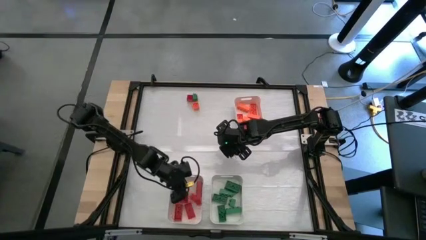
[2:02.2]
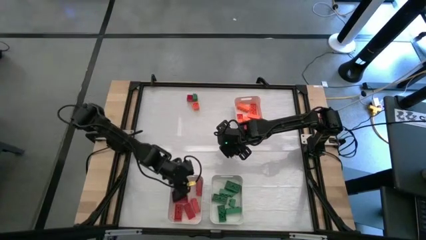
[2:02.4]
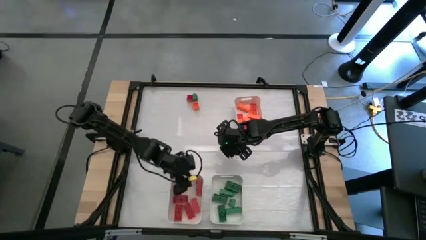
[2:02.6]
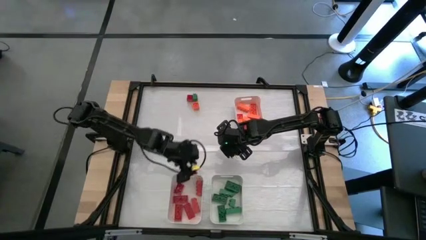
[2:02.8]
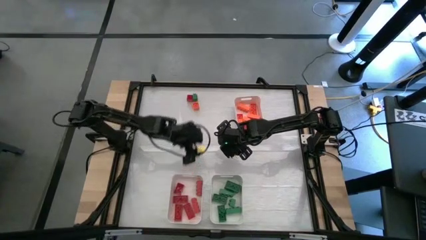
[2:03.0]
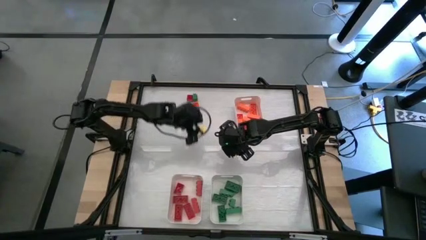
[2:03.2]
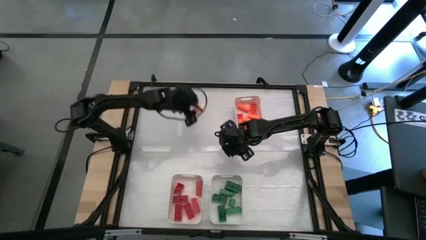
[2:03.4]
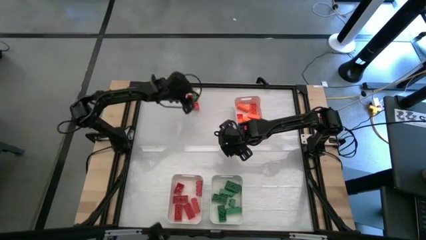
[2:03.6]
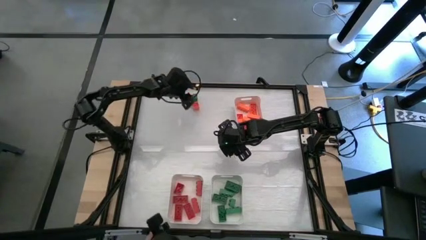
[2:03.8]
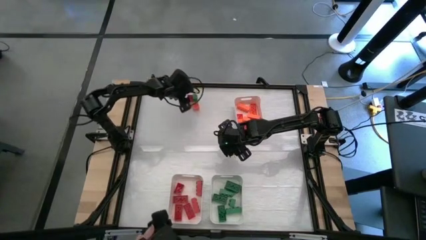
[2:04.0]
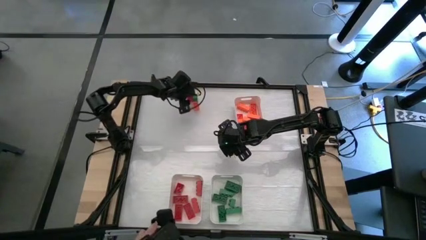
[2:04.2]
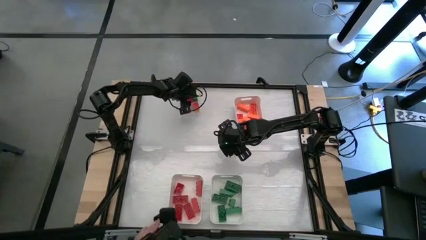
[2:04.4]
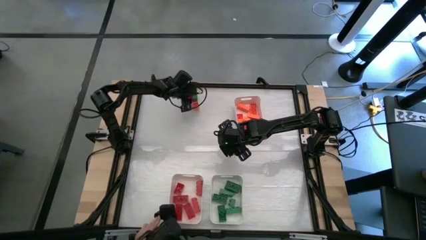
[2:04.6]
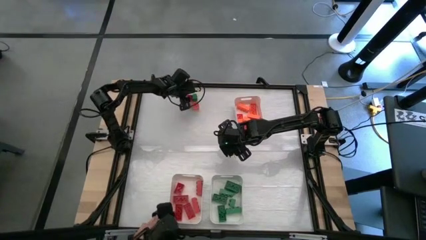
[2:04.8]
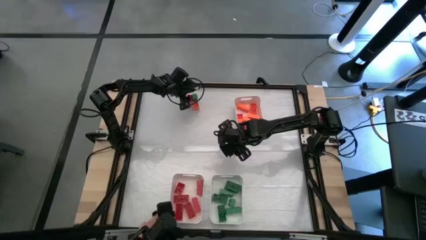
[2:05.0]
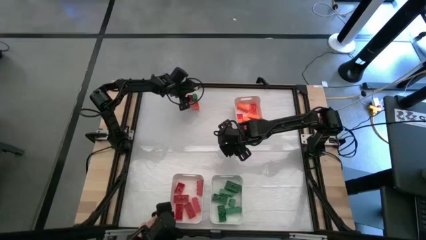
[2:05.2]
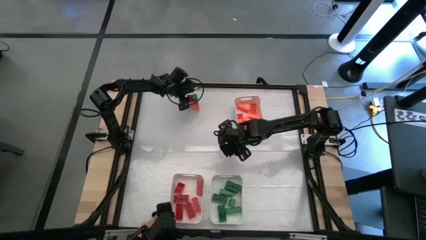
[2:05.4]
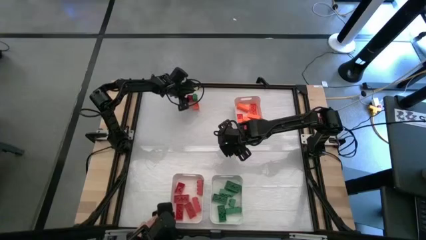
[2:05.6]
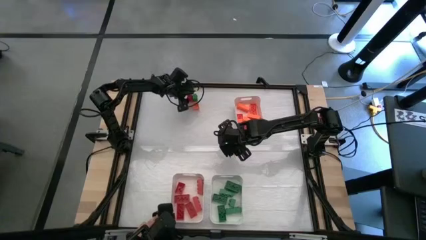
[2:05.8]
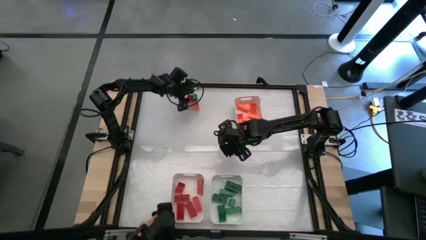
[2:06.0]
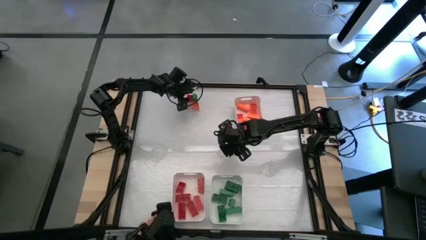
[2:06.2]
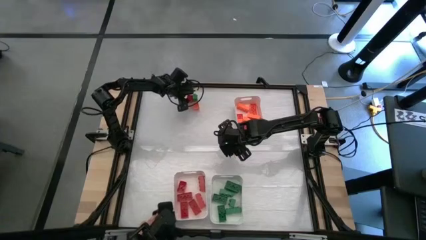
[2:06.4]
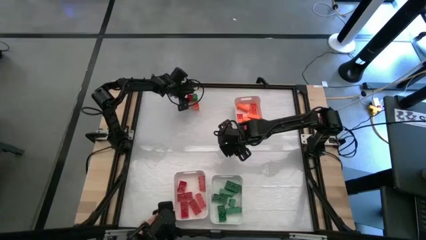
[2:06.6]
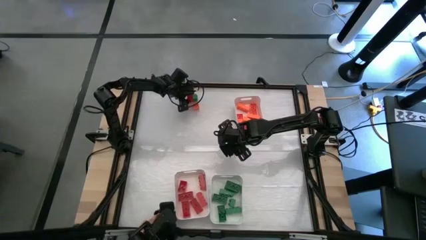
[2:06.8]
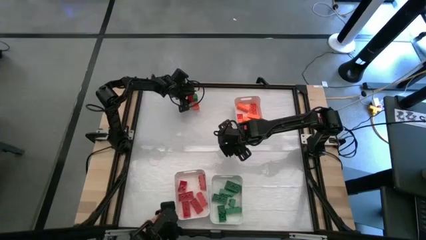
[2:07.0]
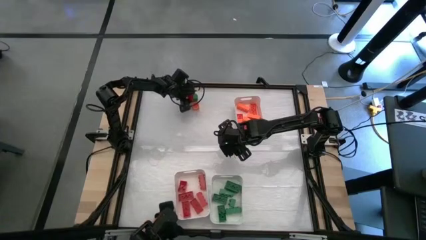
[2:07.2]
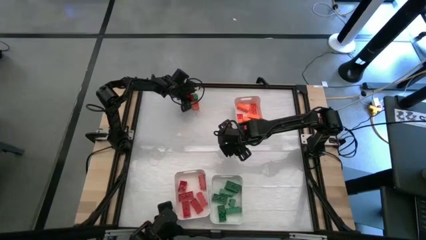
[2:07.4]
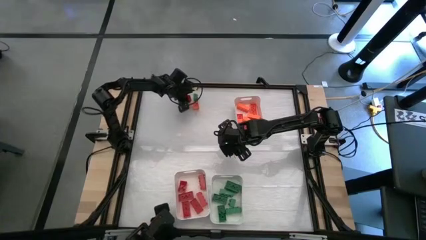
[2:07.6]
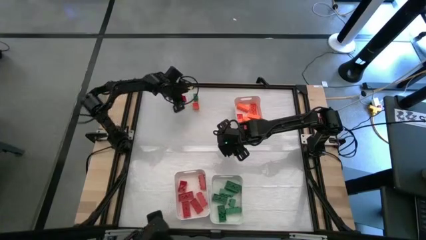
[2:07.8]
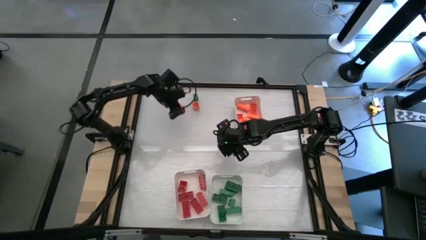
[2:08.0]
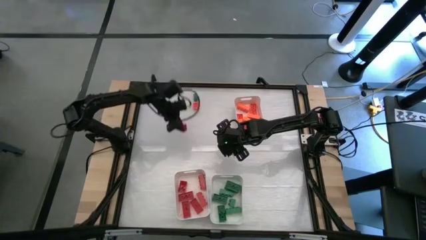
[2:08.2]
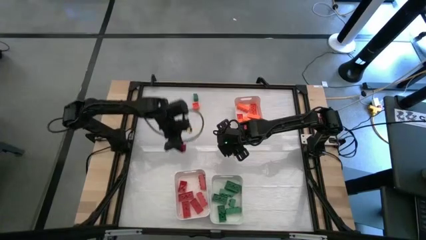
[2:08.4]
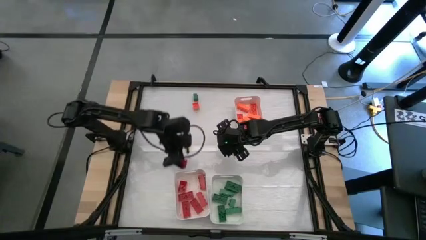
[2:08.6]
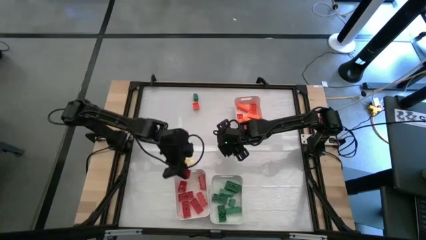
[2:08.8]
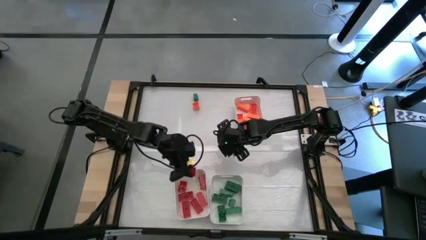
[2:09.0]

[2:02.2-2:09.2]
Task: Sort blocks
Put the red game piece into the bottom left white bin

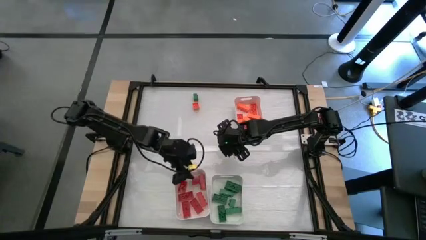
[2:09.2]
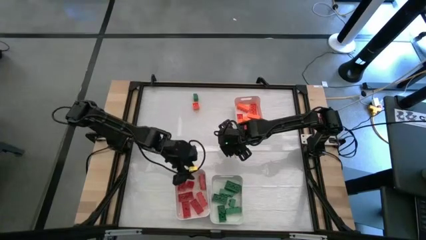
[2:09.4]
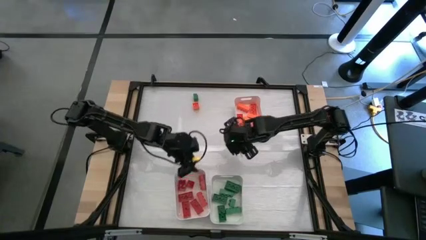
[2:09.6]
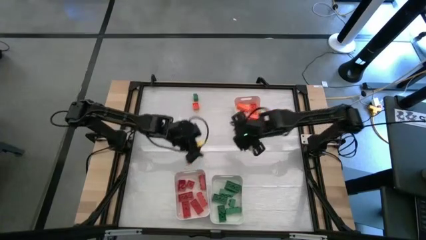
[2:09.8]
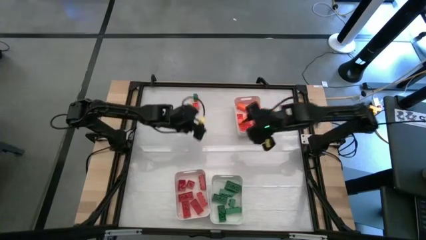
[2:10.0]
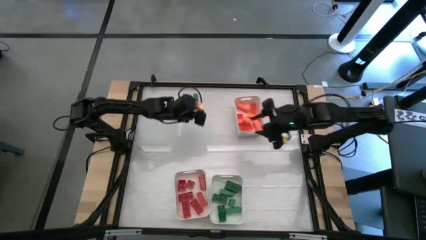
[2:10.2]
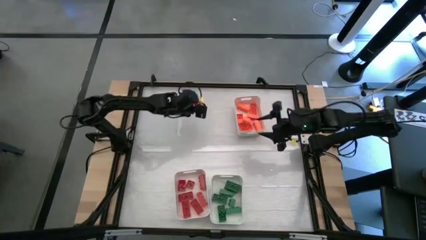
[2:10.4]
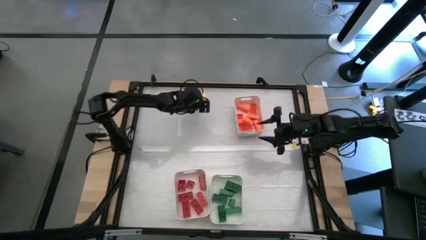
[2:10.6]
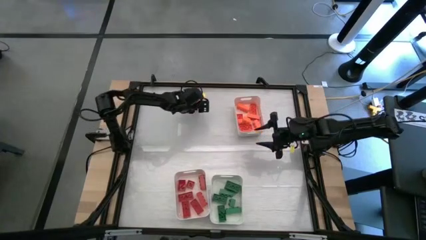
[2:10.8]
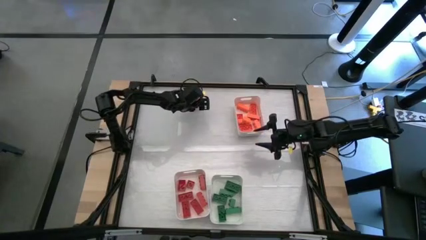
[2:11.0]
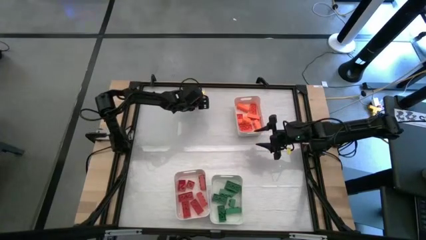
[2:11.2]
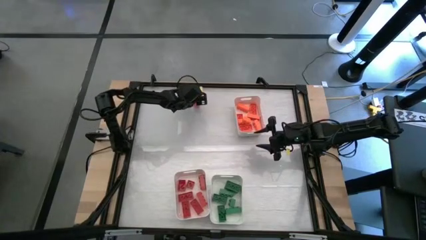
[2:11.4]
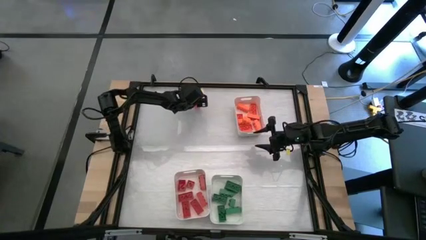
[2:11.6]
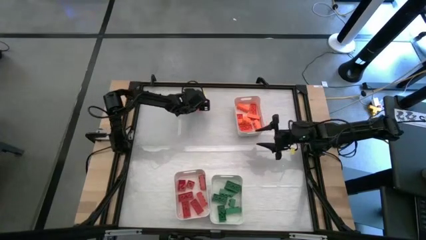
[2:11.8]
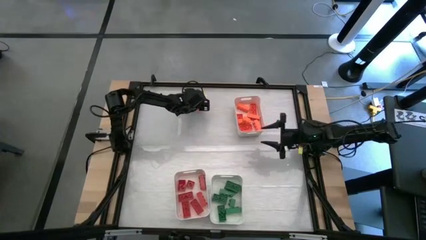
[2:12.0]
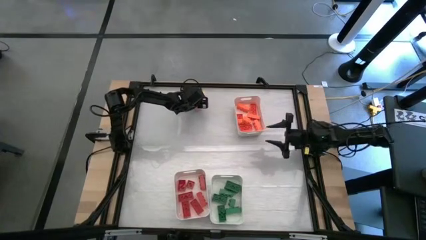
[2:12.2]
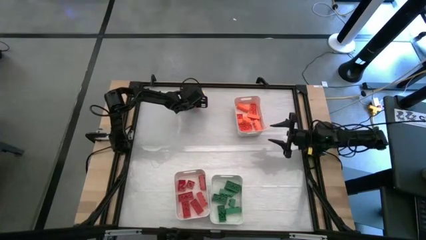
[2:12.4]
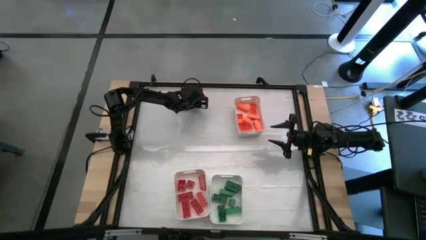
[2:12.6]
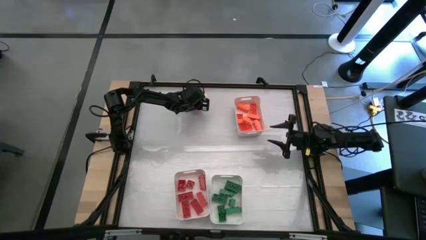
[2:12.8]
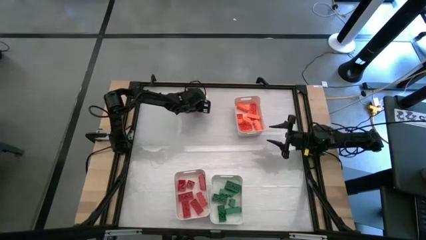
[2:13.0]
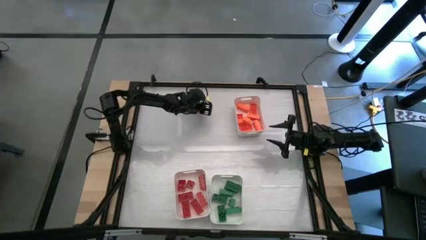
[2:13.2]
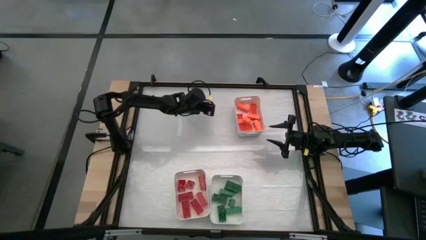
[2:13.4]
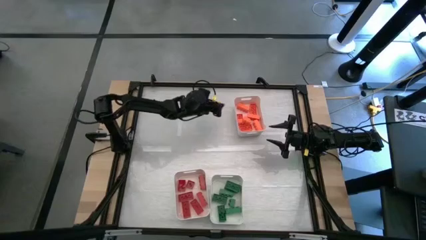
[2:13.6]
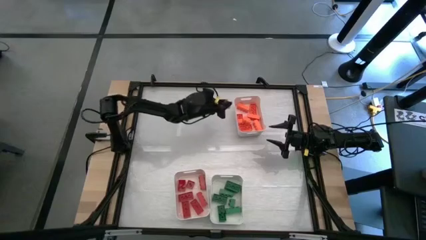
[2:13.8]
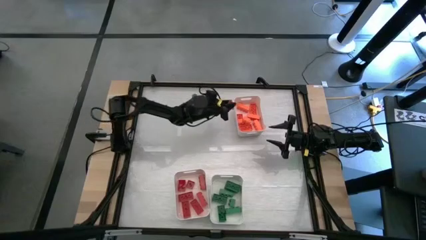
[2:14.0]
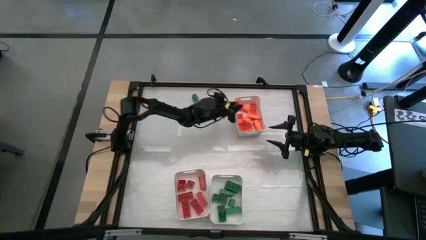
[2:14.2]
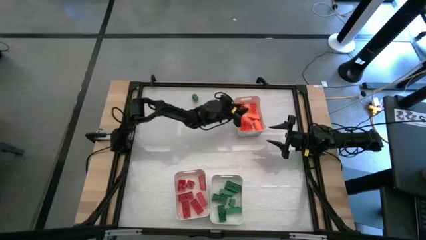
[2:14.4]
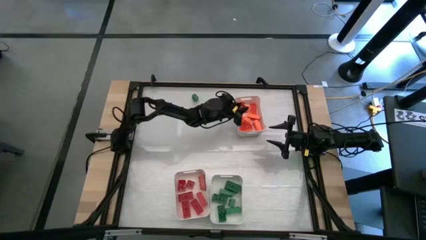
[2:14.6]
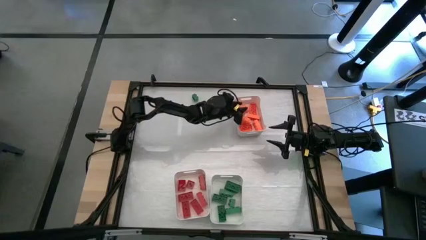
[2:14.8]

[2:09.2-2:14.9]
Put the orange game piece into the top right white bin

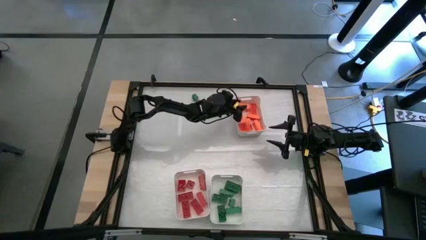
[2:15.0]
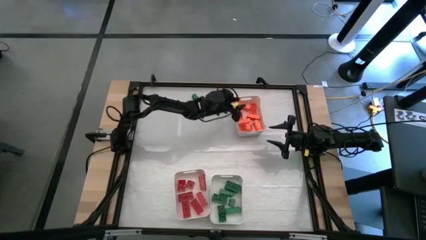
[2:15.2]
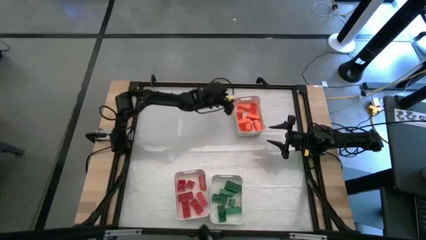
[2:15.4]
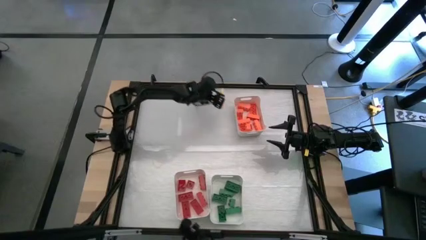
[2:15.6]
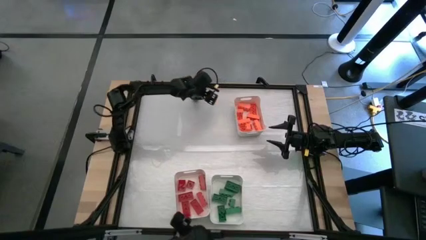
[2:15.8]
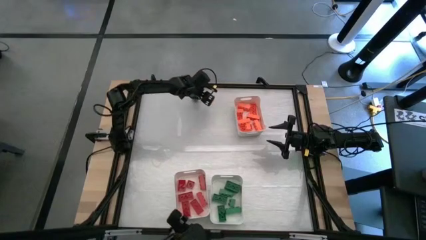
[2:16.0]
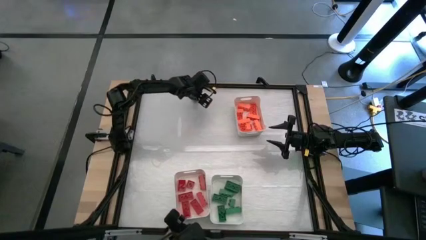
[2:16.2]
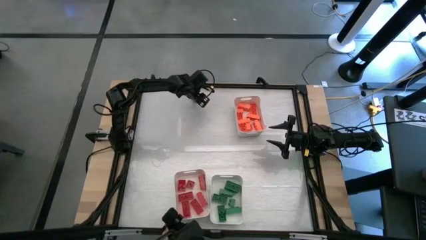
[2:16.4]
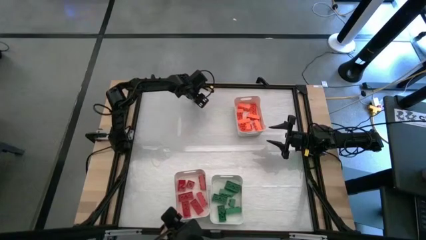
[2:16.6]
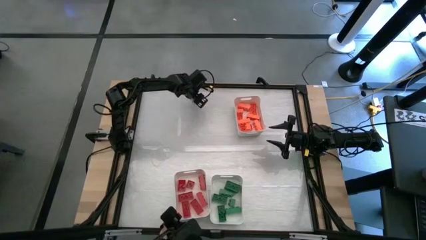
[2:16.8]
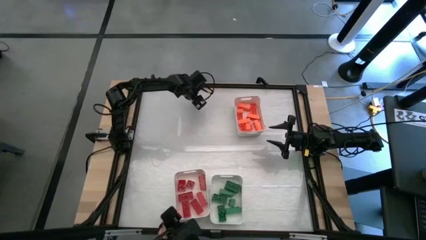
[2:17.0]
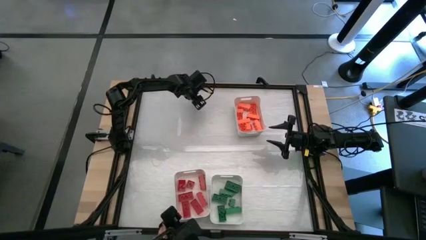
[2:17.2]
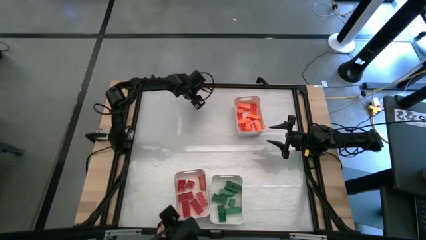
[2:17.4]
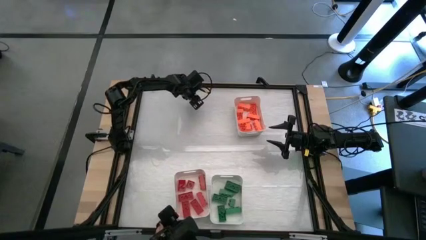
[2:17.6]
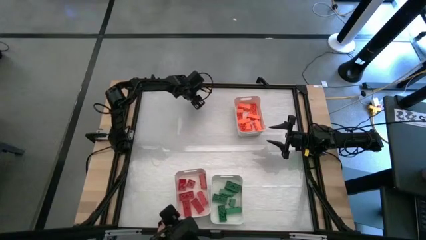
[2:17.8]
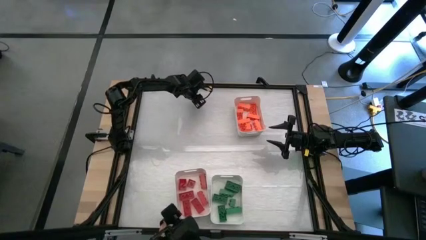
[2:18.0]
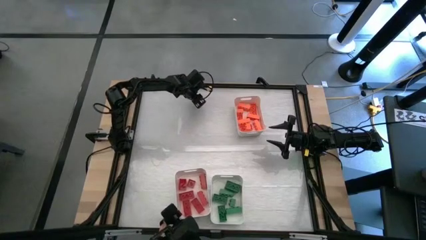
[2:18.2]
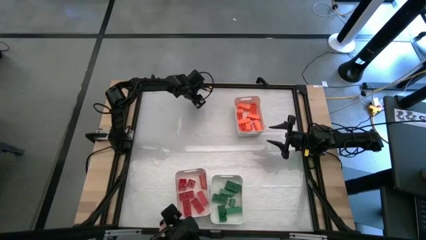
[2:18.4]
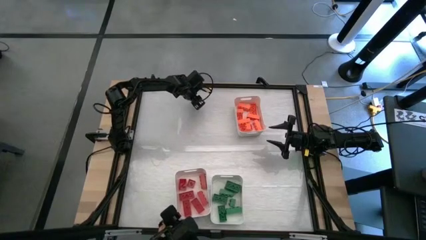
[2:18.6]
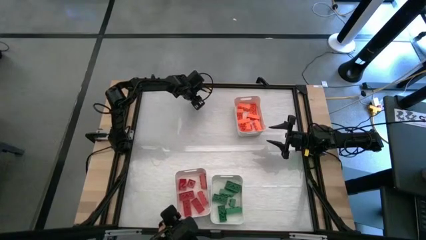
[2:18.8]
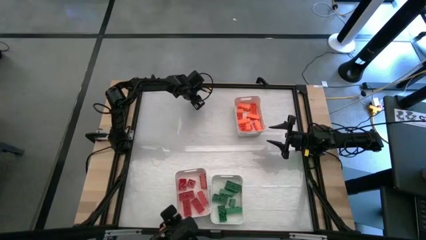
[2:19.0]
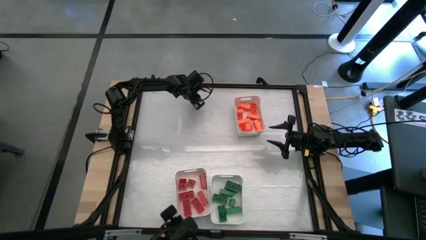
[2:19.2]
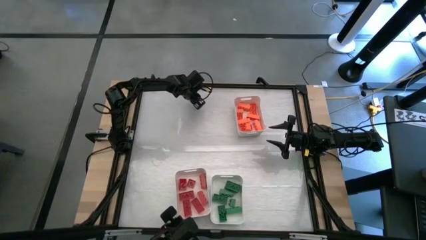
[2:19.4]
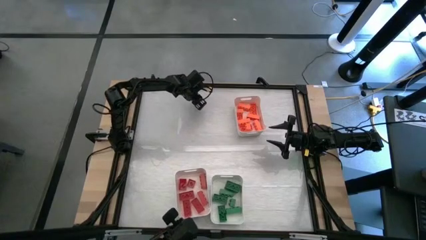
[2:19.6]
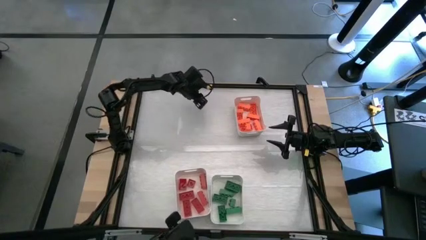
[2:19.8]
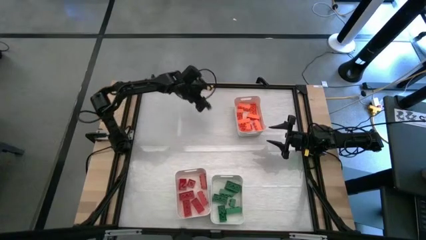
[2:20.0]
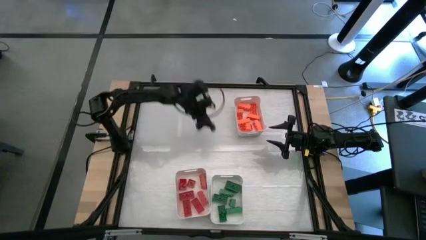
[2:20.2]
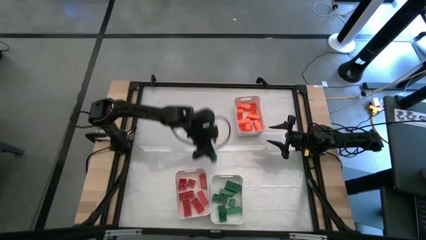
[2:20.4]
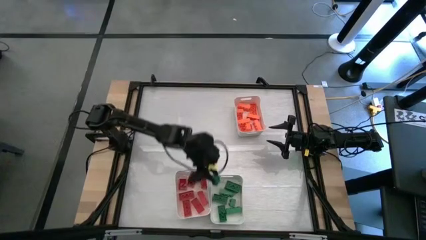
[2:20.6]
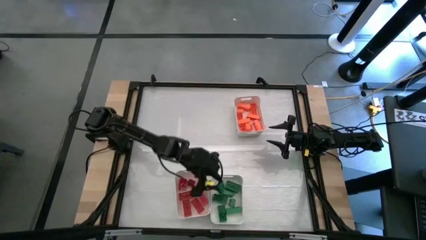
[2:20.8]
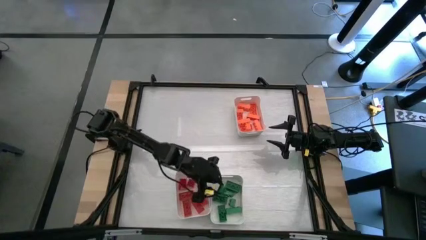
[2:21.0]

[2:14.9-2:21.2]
Put the green game piece into the bottom right white bin
